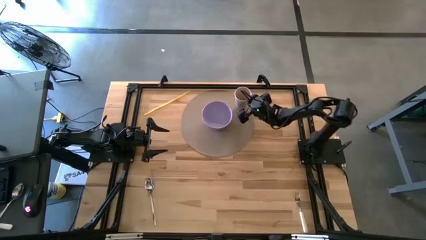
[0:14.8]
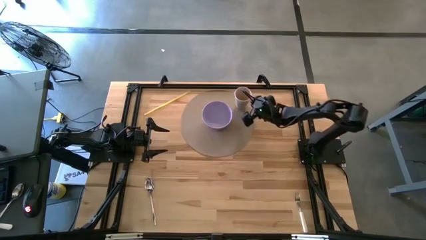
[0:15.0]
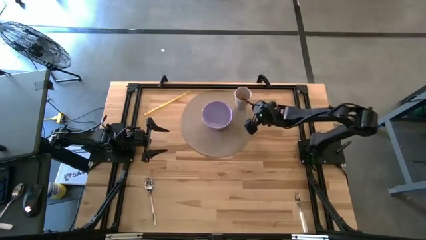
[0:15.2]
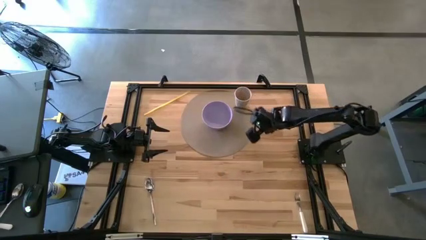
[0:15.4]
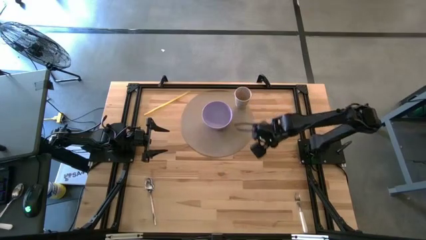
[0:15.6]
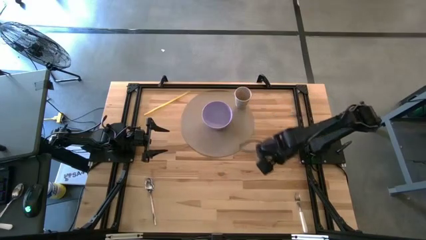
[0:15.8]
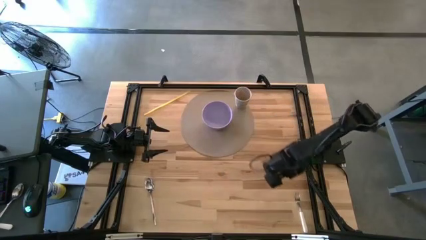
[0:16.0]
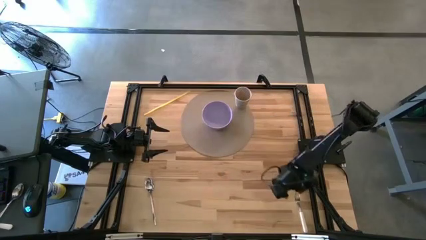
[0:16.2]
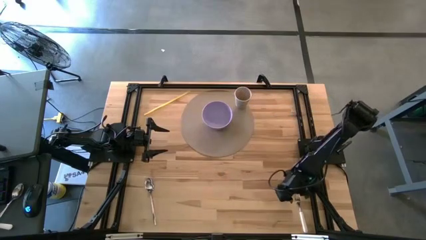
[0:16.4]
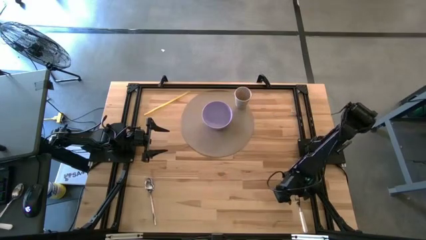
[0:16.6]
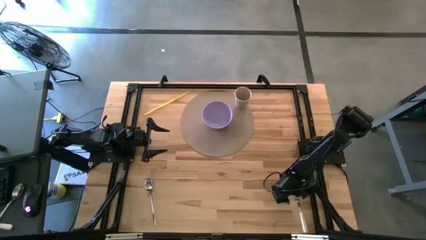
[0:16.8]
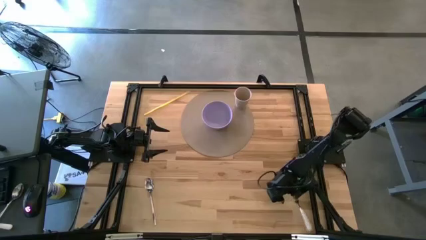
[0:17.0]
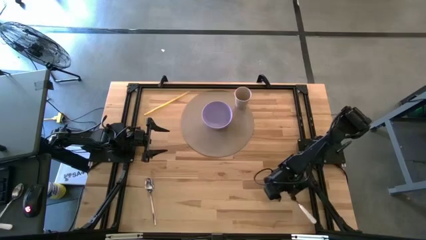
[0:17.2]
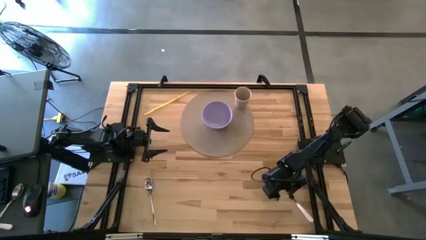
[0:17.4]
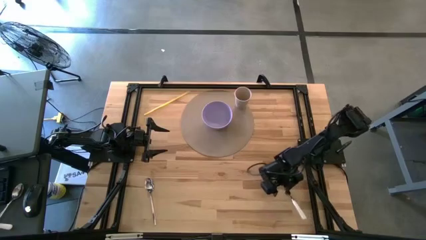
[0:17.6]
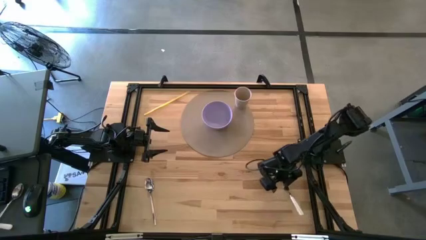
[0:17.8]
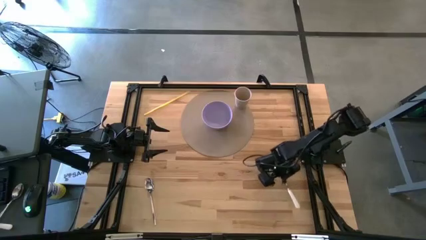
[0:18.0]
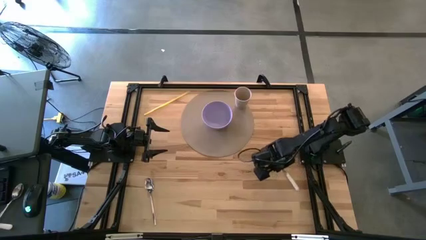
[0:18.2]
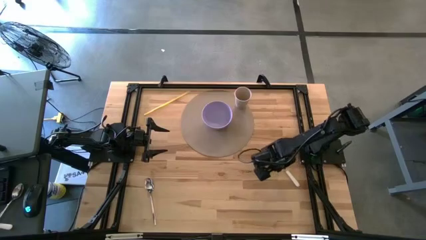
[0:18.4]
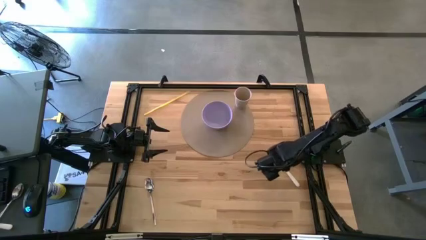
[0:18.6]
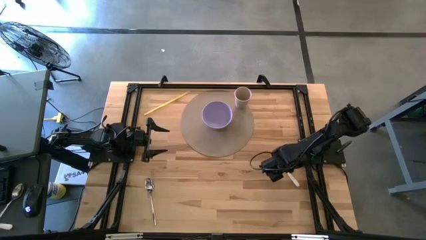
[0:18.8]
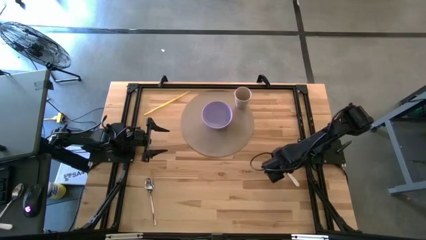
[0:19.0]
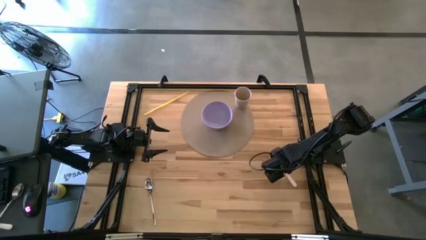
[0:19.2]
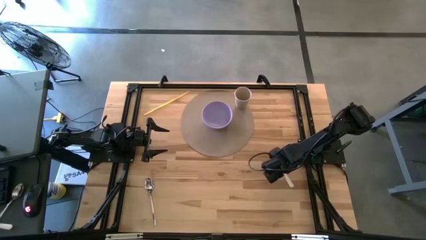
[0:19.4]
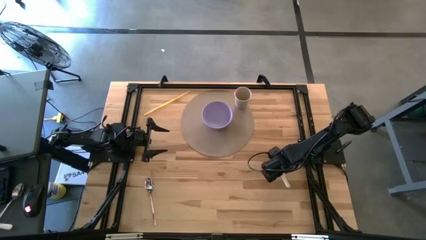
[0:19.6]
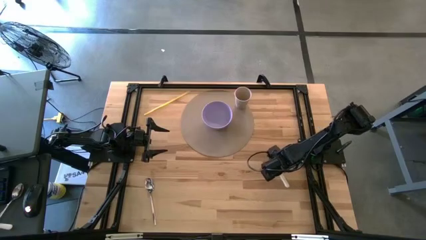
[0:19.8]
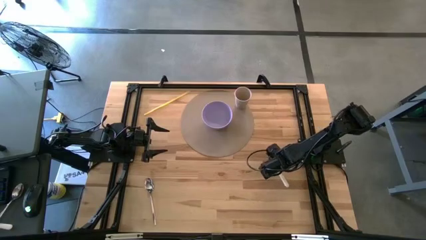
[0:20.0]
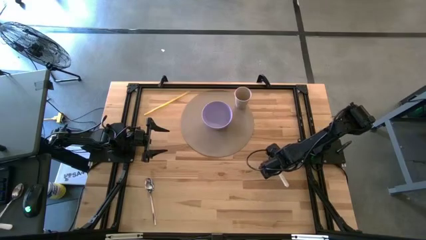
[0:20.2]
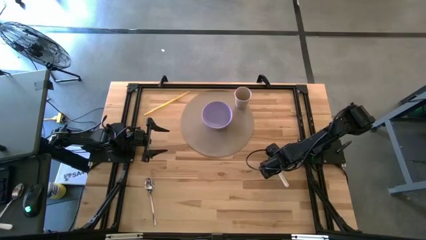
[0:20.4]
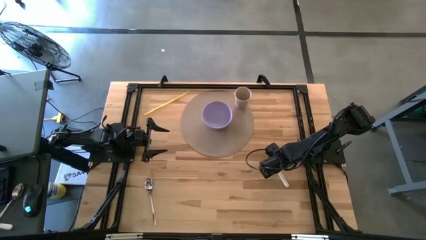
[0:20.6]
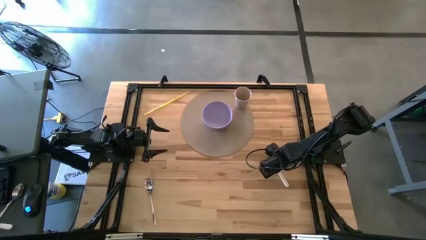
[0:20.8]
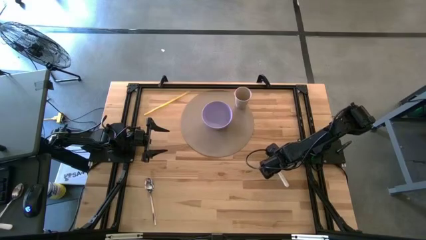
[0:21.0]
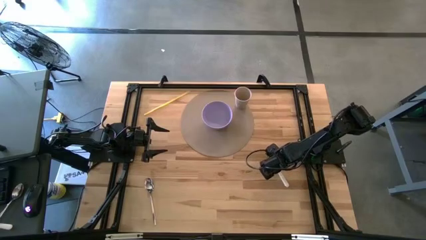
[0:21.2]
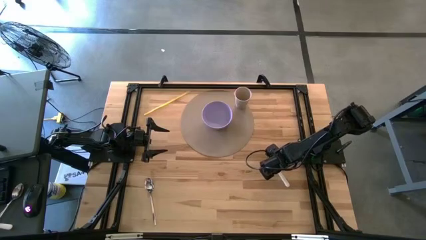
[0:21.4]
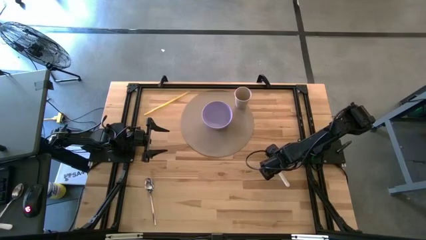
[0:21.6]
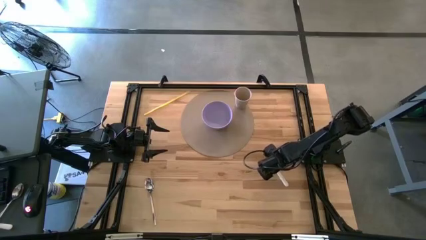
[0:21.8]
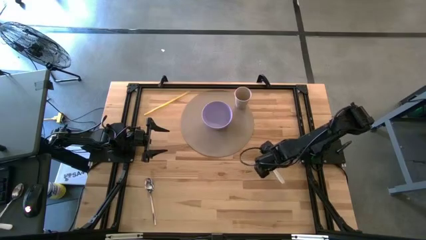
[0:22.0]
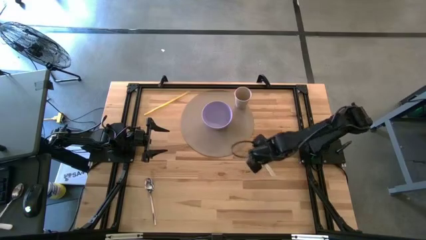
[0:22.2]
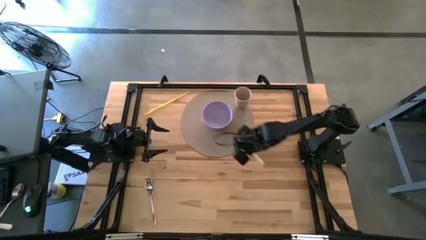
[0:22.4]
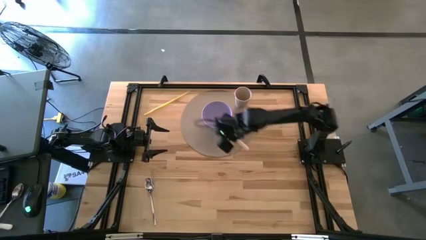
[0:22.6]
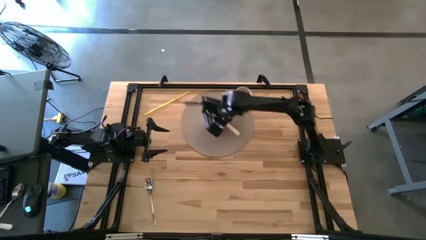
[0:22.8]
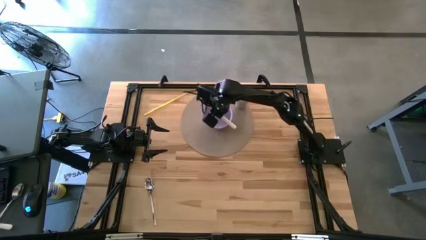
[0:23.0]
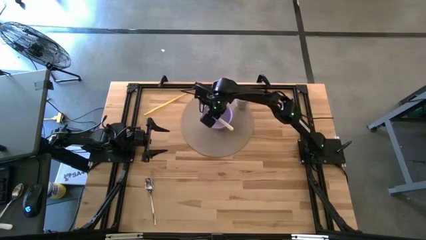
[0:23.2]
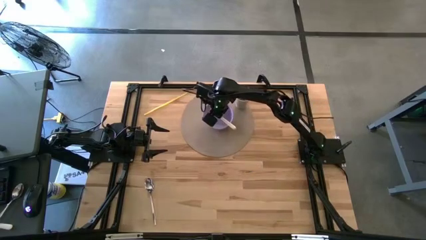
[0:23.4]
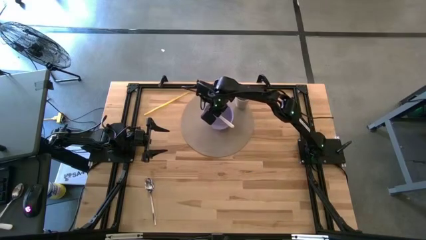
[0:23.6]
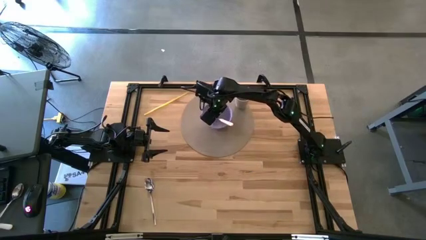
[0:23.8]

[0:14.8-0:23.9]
Task: Pick & Place Utensil
Put the white fork into the purple bowl on the brown mat

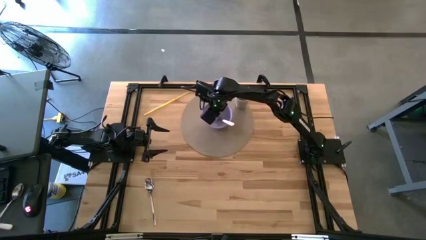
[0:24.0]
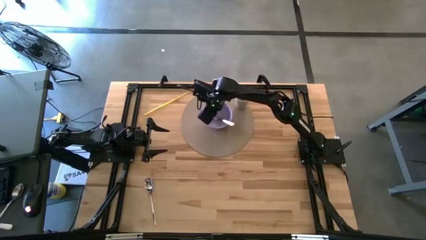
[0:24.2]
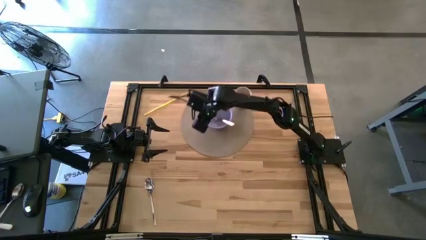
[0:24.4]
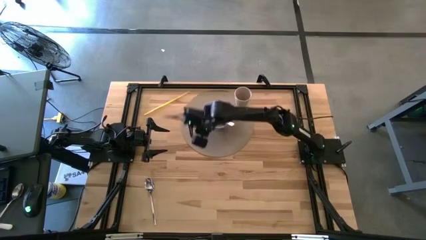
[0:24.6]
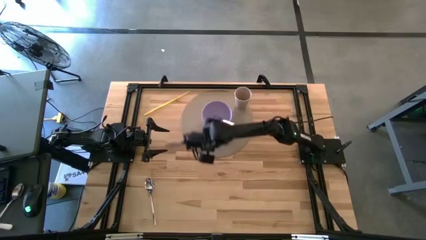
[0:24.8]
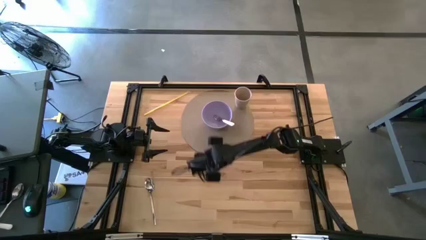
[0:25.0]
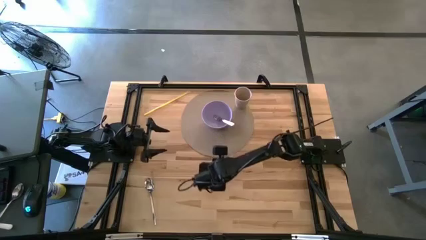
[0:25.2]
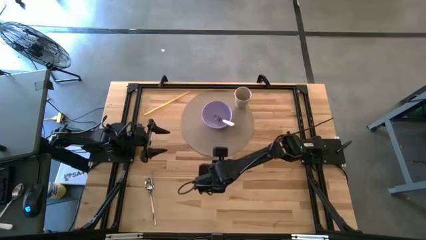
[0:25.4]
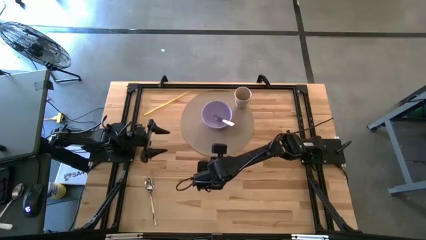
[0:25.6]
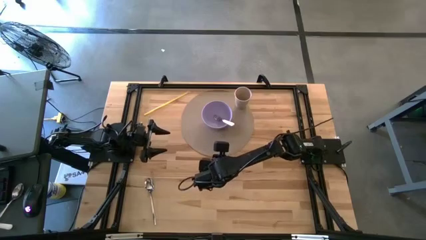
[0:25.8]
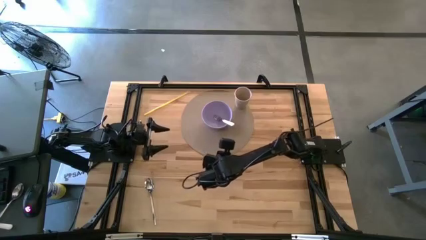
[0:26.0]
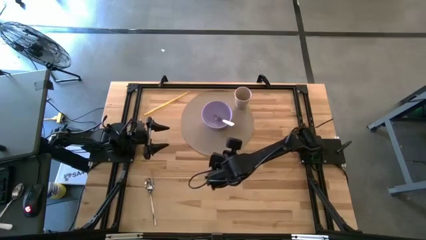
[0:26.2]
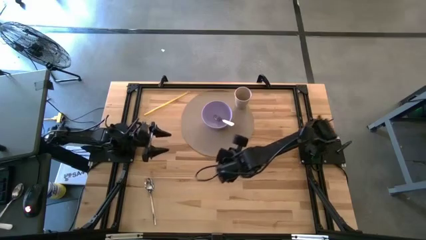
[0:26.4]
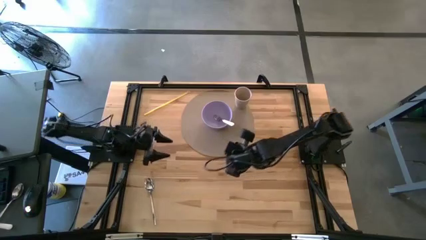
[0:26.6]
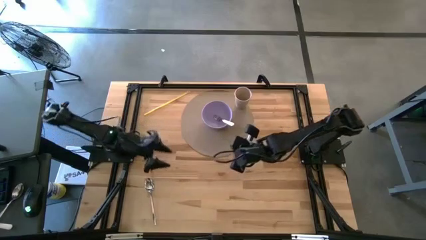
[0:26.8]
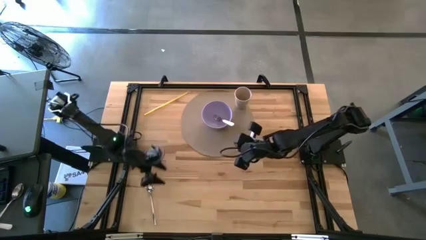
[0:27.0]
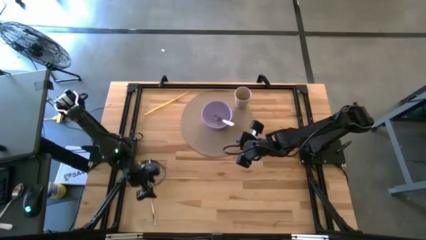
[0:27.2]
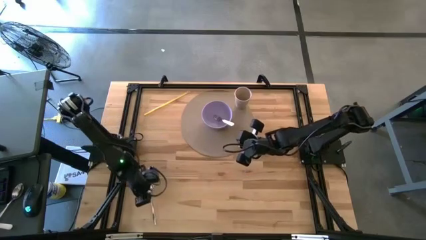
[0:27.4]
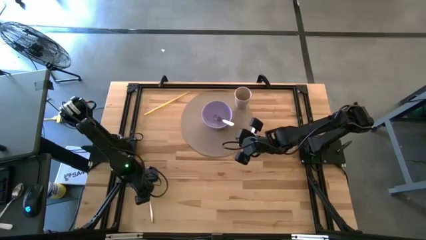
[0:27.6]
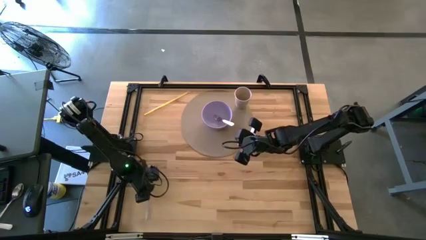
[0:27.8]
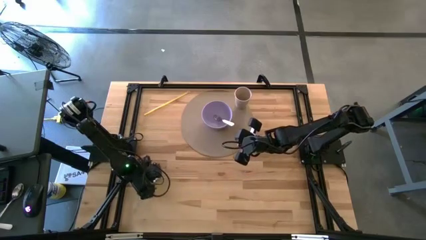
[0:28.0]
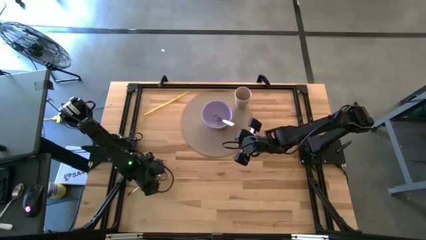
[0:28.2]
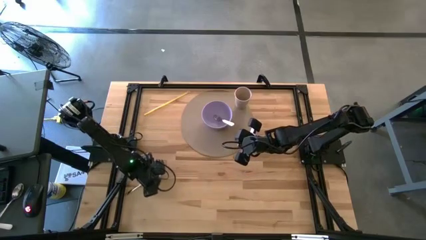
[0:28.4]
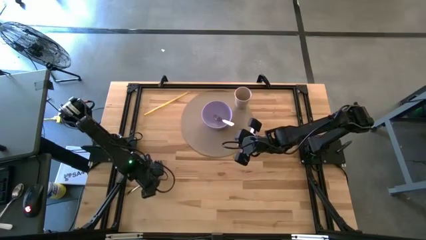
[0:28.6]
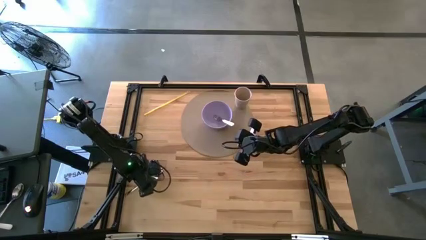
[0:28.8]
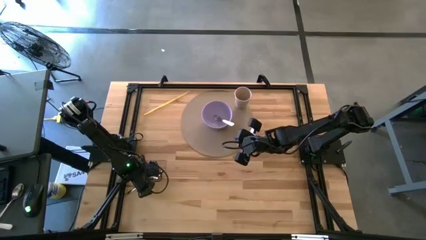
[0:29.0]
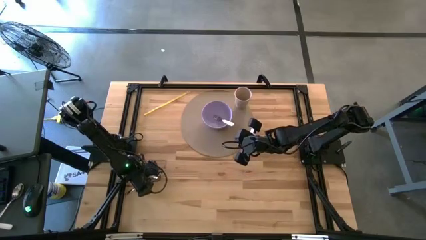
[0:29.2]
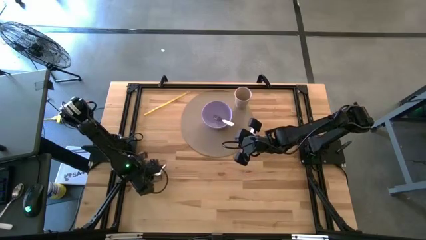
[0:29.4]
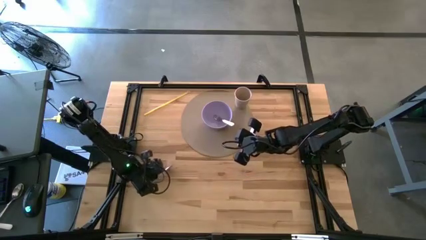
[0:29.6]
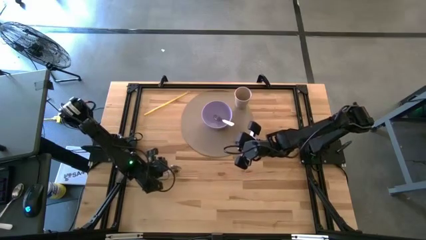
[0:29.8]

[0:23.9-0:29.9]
Put the silver spoon into the purple bowl on the brown mat

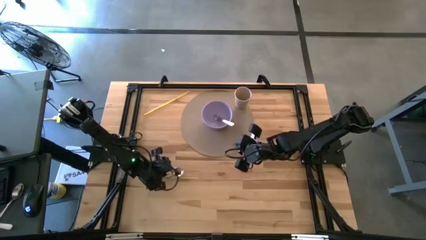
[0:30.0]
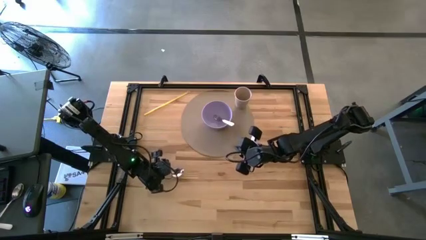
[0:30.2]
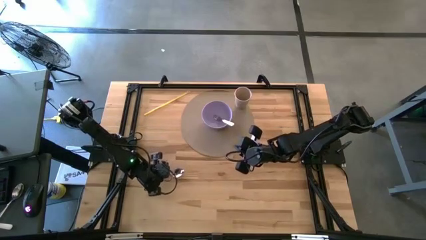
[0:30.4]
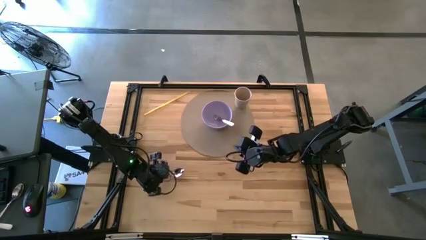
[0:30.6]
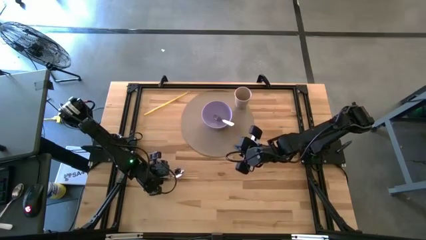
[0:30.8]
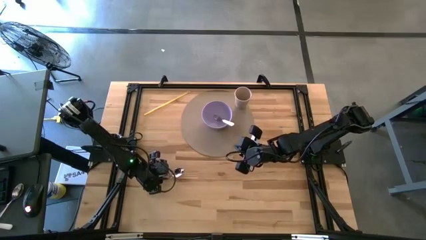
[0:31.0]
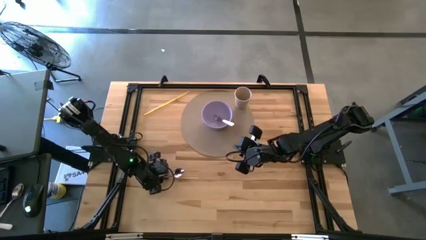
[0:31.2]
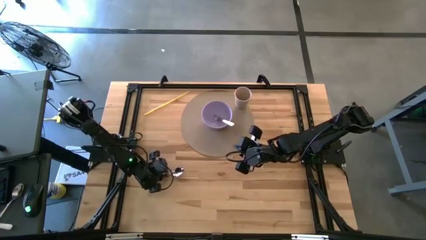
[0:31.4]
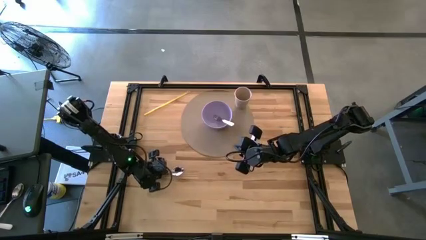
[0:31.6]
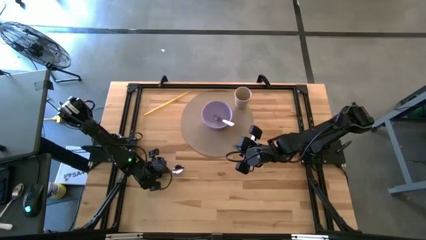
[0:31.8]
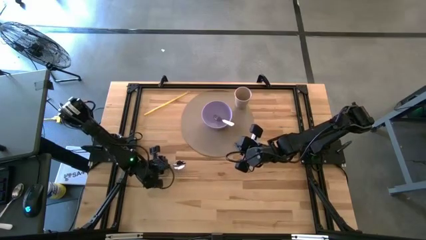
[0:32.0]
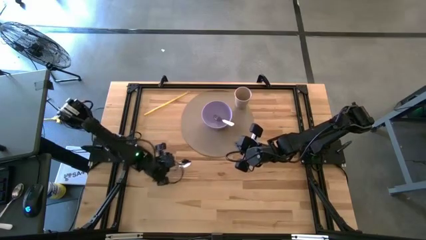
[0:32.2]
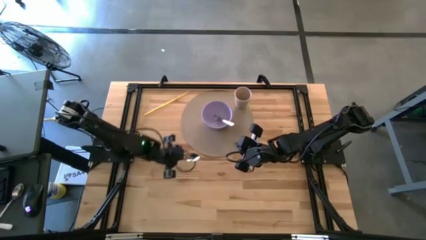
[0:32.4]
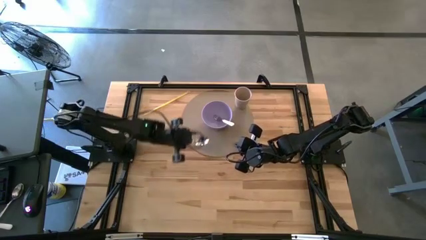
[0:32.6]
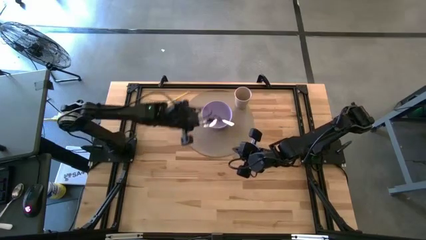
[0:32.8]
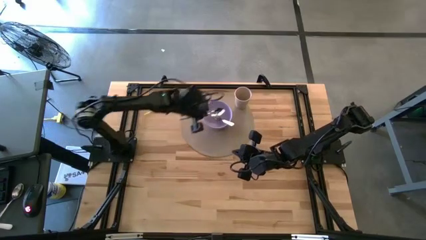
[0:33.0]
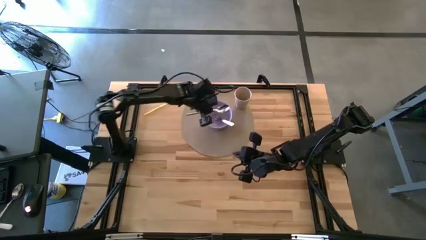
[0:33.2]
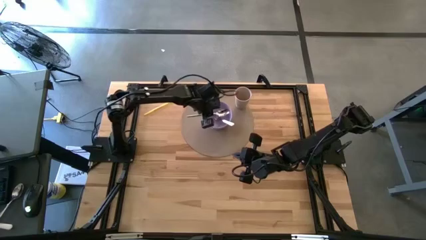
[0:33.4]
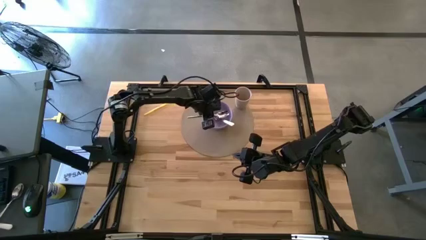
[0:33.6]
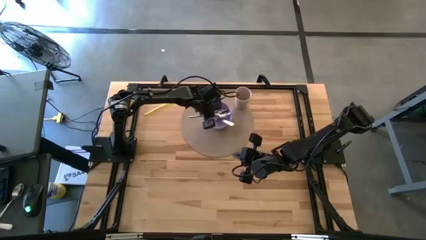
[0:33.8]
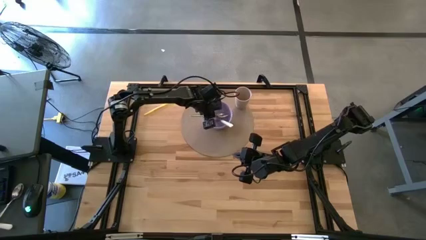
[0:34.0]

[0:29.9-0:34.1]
Put the silver spoon into the purple bowl on the brown mat
